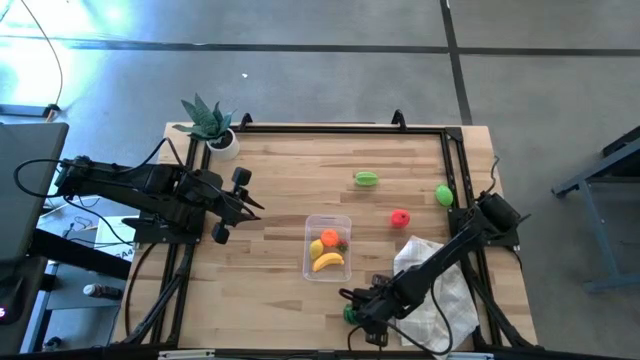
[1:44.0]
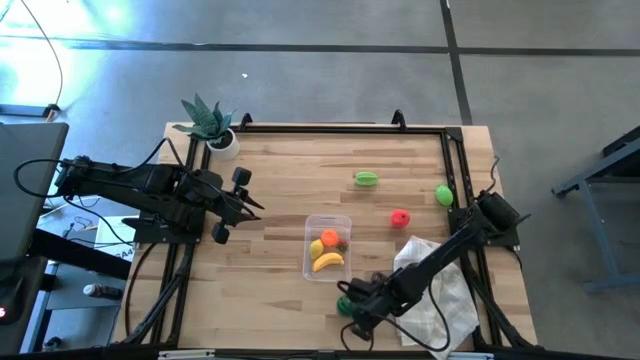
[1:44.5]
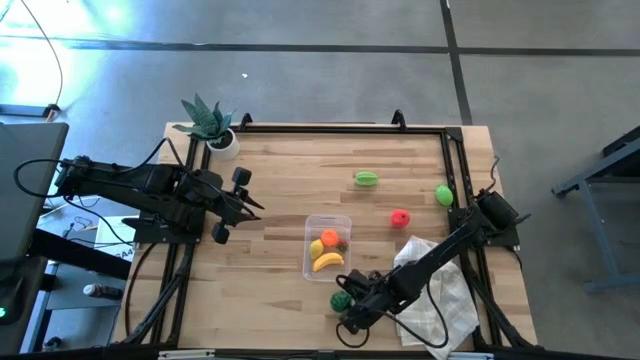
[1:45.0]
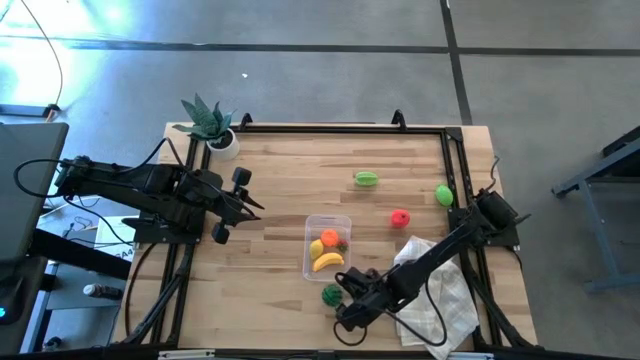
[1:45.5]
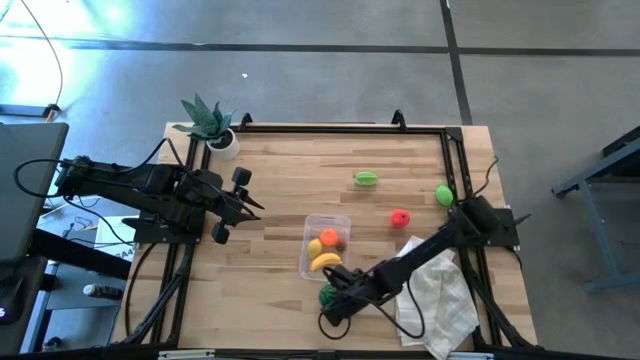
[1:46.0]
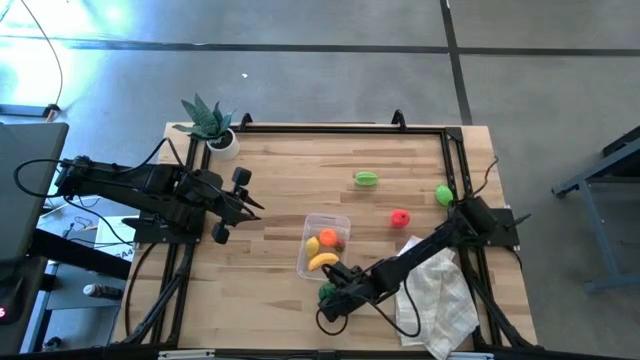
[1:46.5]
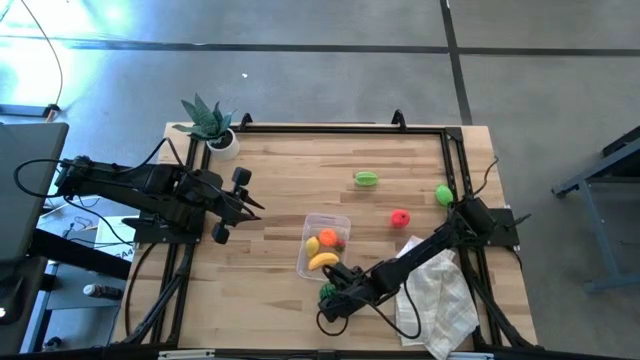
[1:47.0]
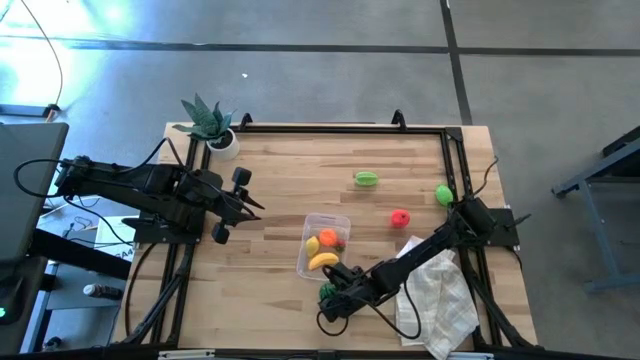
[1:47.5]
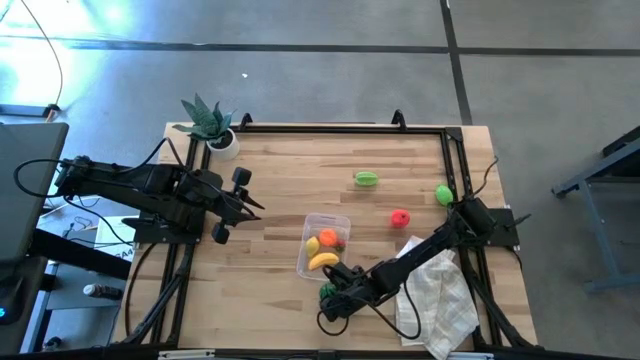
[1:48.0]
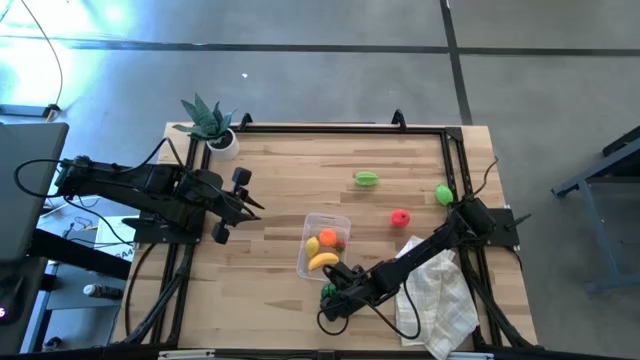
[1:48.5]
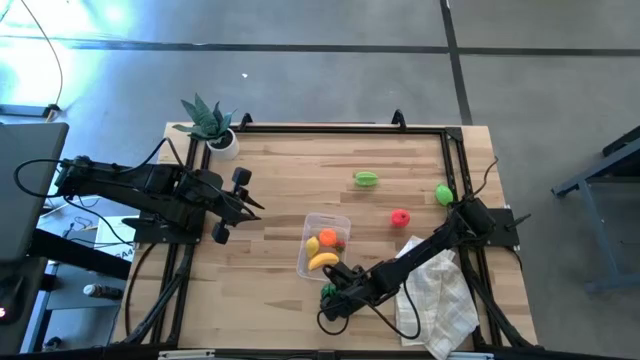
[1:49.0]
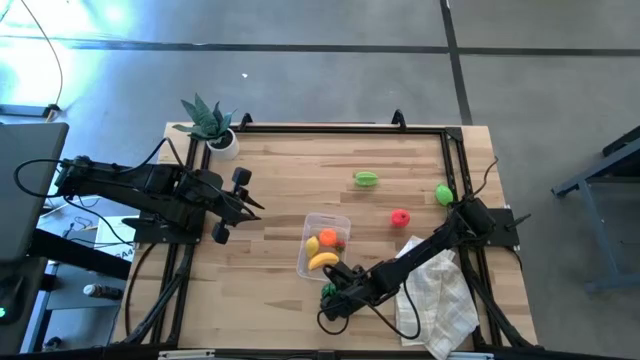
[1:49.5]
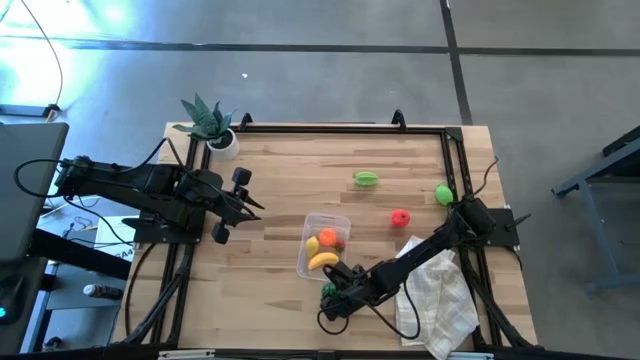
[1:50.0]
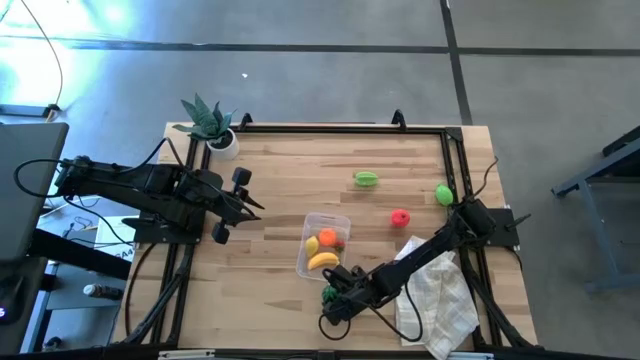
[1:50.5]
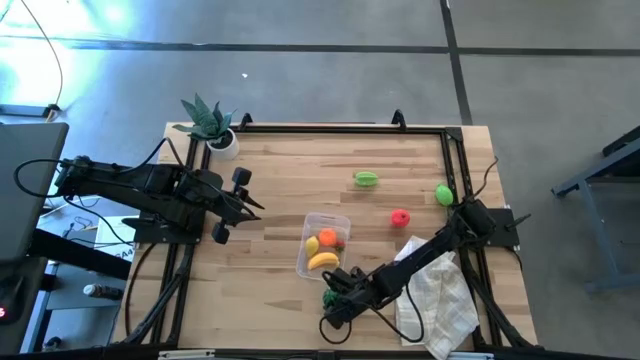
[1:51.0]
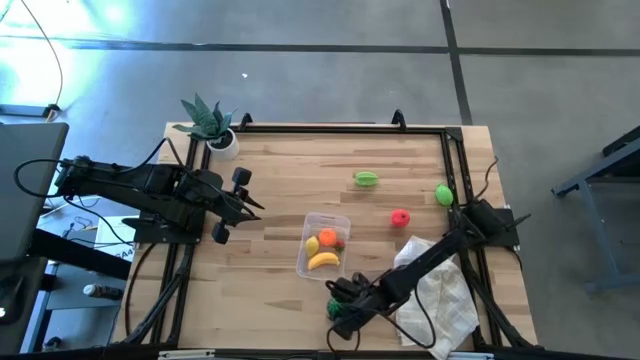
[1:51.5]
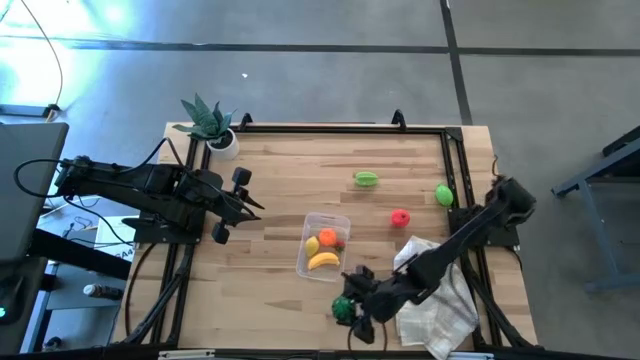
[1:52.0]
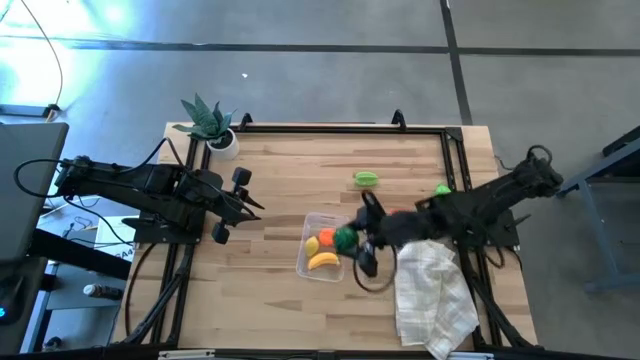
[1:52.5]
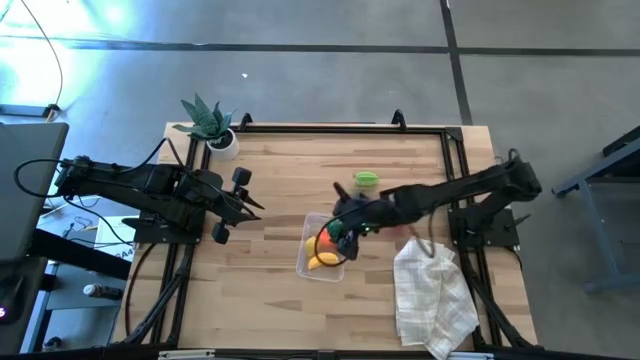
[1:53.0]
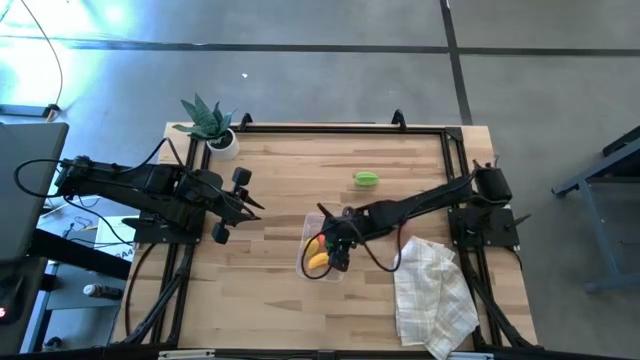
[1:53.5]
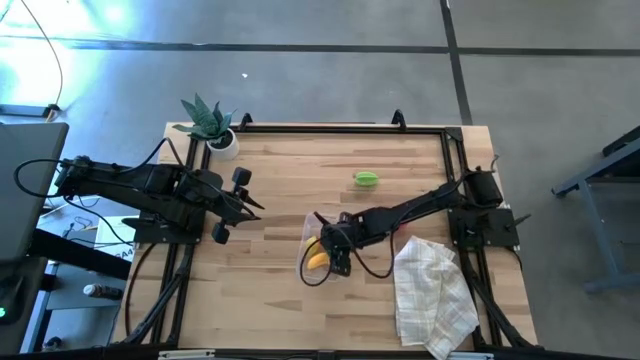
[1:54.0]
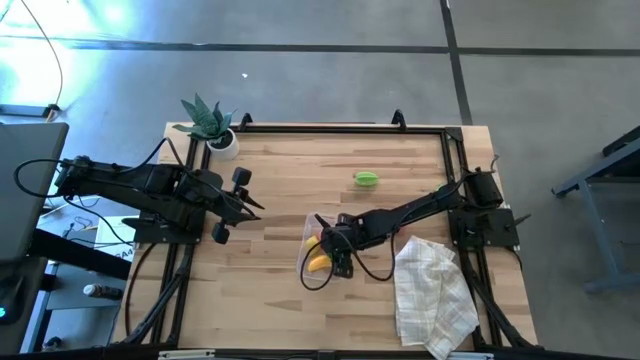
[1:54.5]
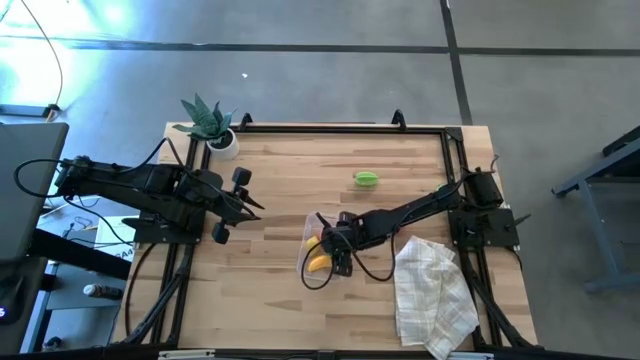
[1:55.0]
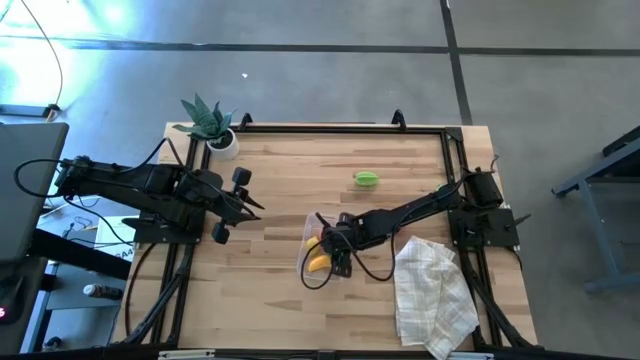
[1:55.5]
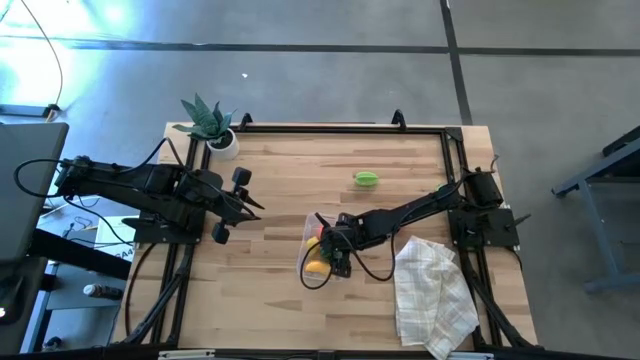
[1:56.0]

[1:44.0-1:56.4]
Task: Pick and placing Produce into tupperware
Put the watermelon into the transparent bin
